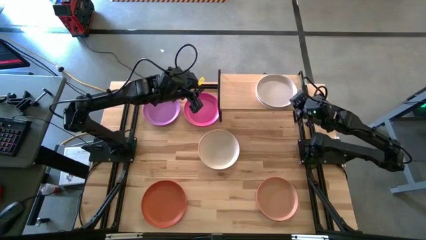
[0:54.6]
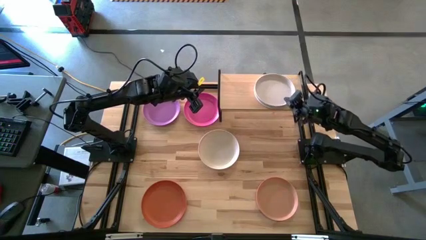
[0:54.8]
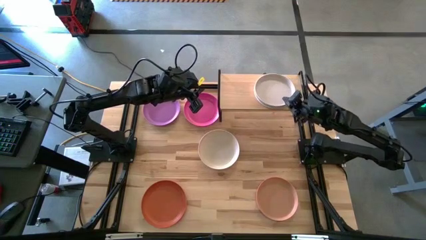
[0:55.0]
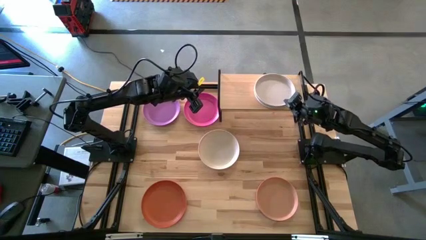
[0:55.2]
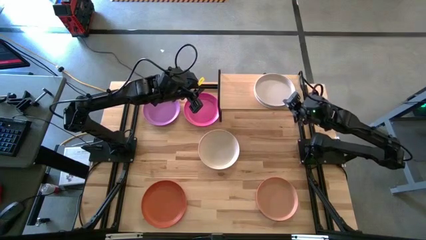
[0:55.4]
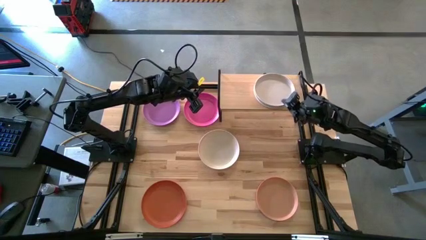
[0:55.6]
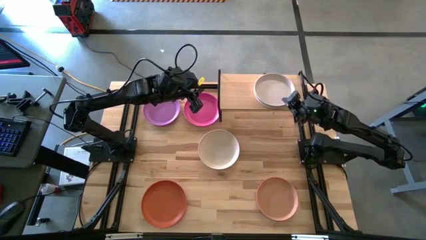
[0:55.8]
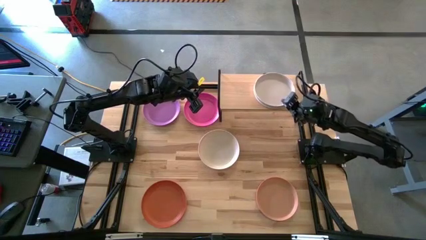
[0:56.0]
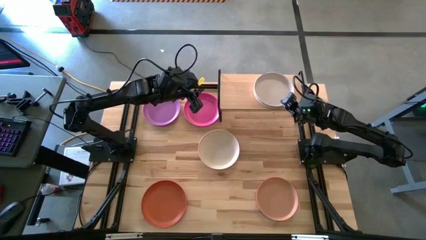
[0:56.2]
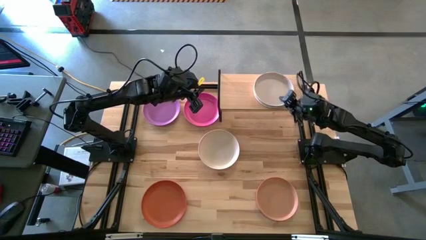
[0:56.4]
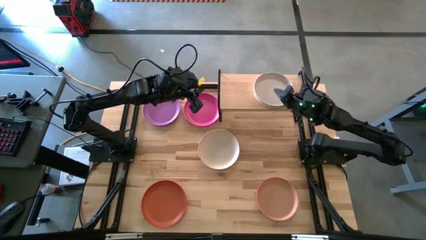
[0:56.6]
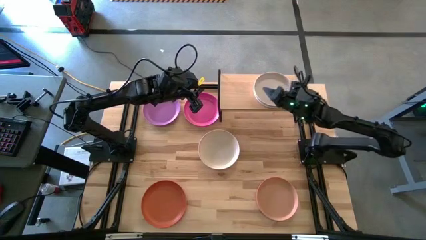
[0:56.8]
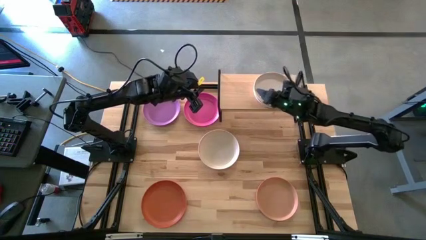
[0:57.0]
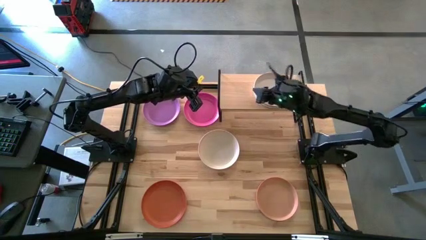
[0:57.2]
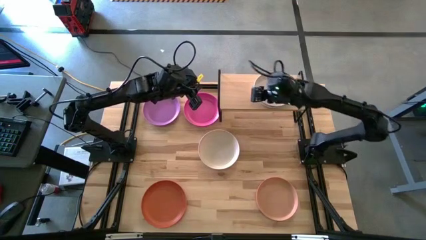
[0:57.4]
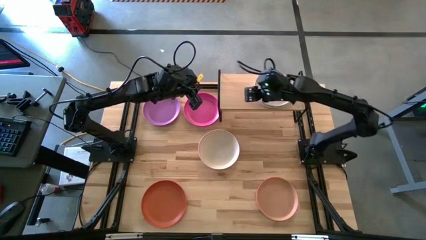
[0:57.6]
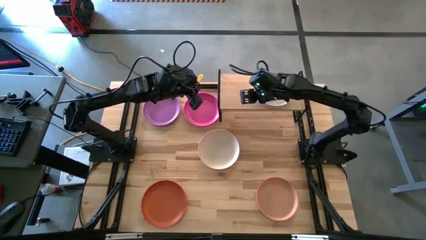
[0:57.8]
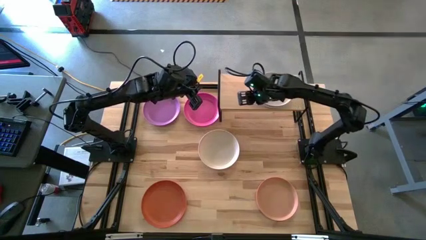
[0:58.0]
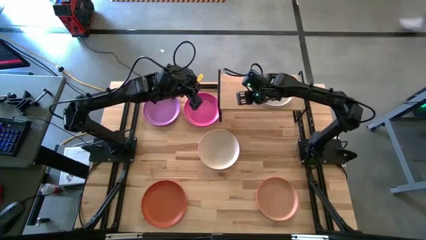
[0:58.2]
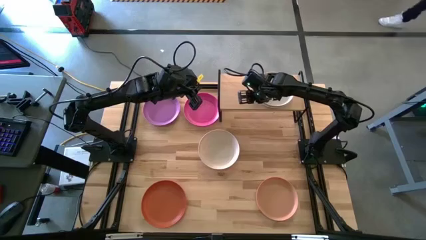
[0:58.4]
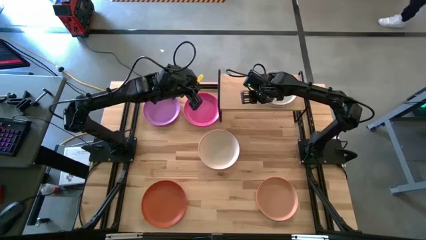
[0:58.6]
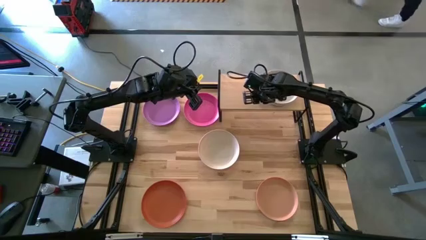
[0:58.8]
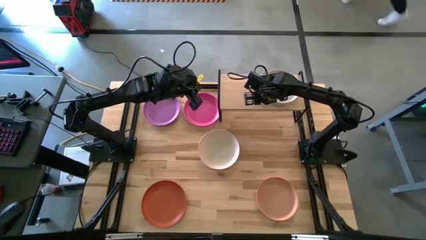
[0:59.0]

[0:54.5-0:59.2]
Task: Place and stack plates onto a shelf
Adjust the plates

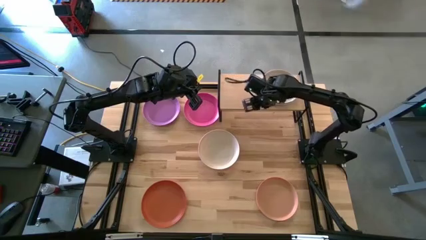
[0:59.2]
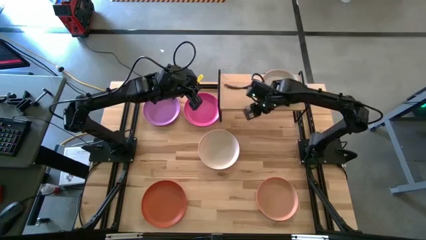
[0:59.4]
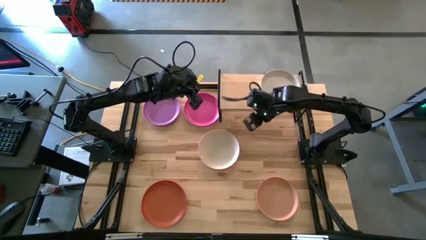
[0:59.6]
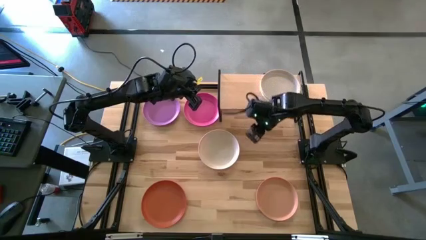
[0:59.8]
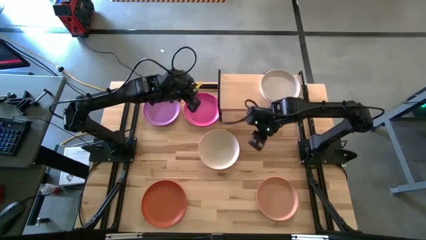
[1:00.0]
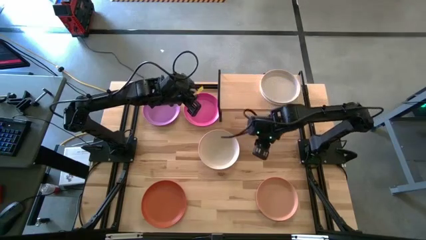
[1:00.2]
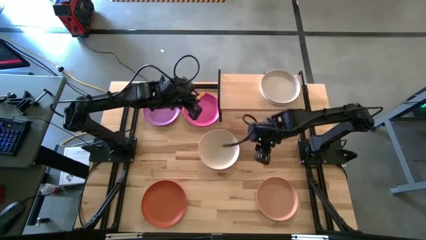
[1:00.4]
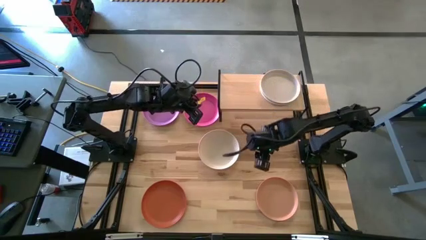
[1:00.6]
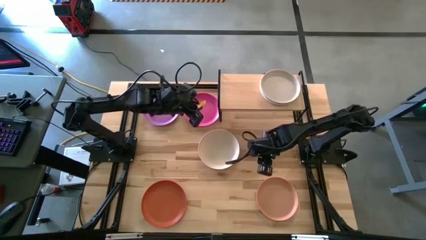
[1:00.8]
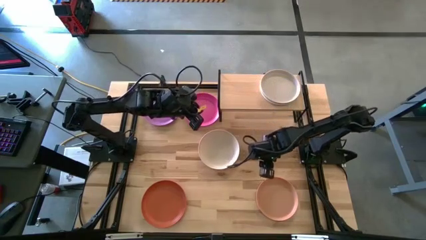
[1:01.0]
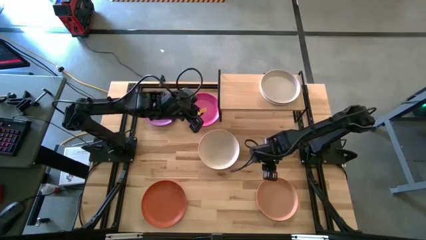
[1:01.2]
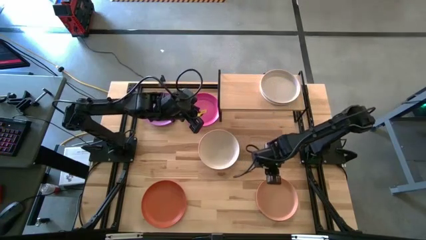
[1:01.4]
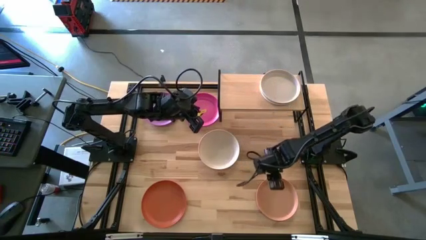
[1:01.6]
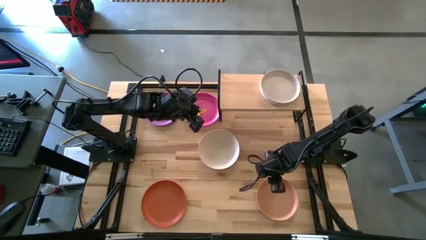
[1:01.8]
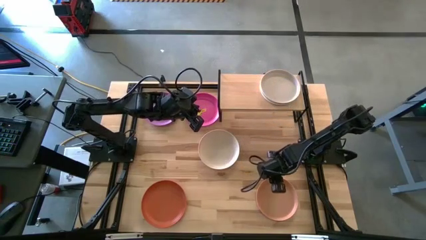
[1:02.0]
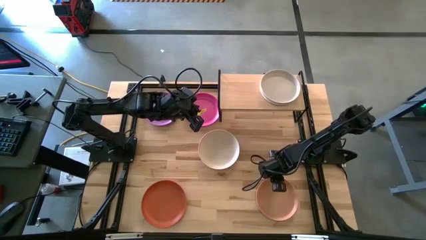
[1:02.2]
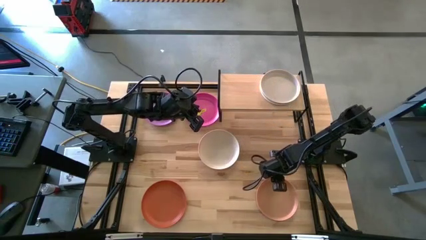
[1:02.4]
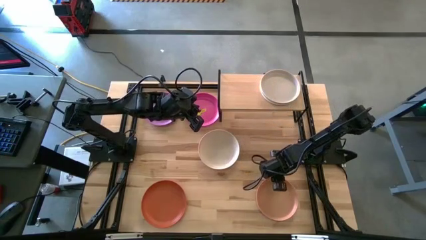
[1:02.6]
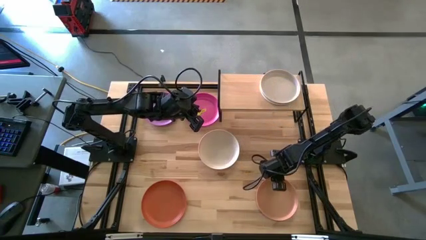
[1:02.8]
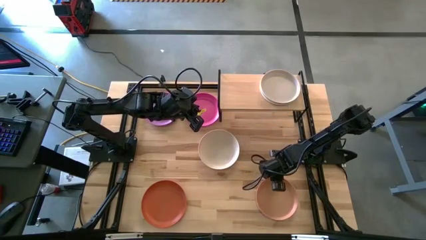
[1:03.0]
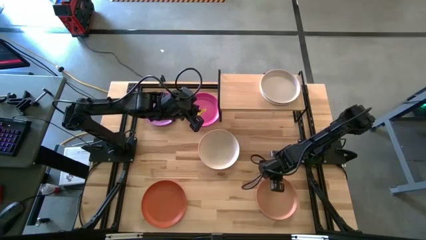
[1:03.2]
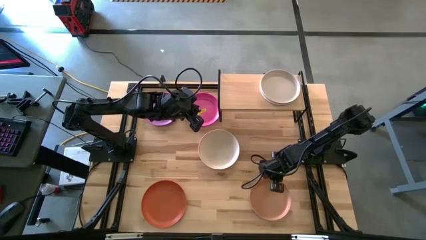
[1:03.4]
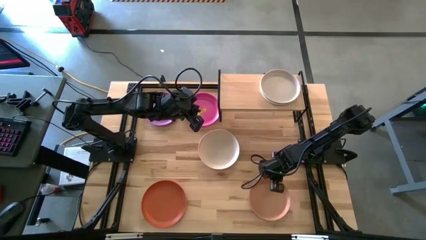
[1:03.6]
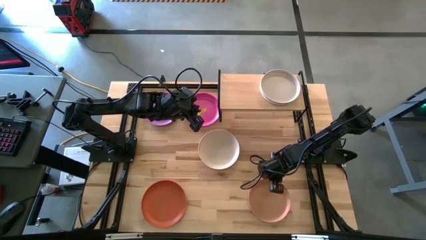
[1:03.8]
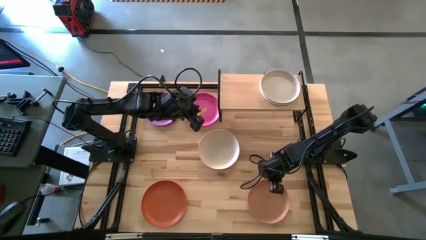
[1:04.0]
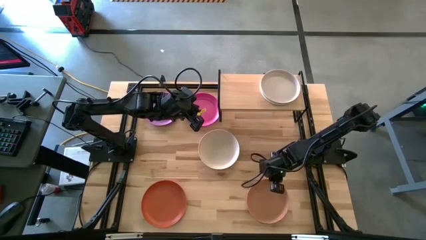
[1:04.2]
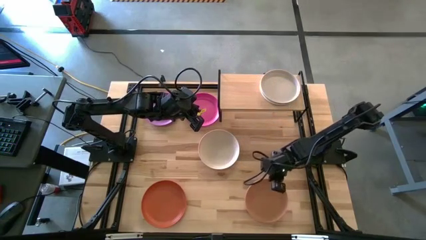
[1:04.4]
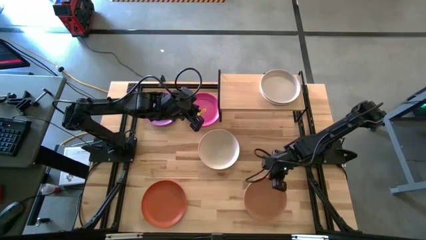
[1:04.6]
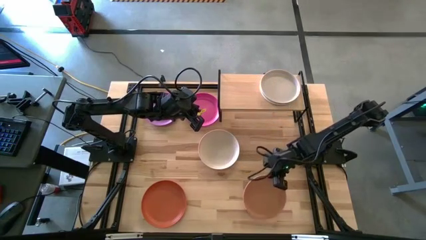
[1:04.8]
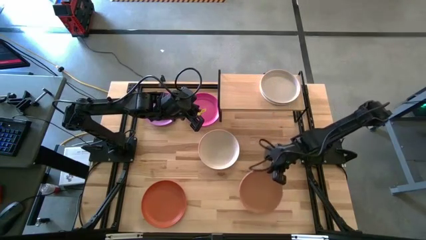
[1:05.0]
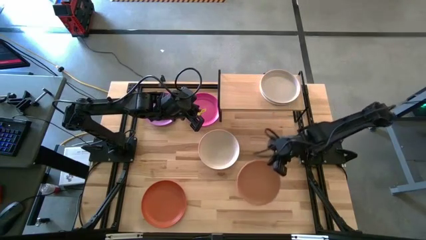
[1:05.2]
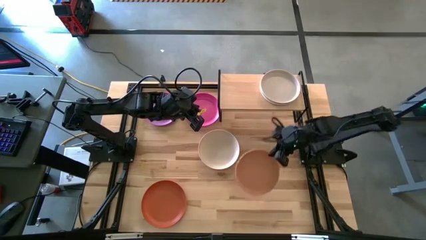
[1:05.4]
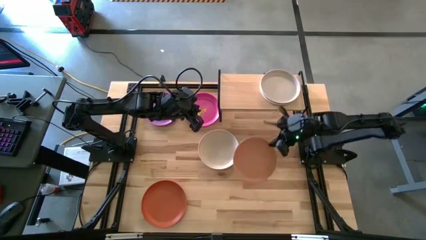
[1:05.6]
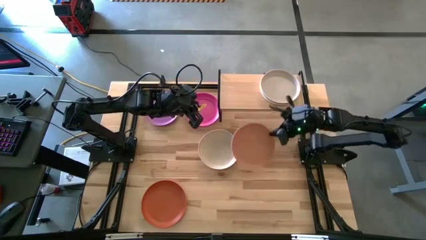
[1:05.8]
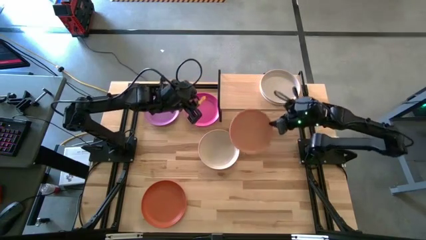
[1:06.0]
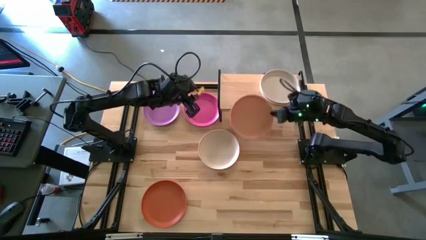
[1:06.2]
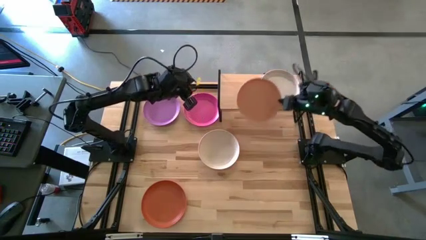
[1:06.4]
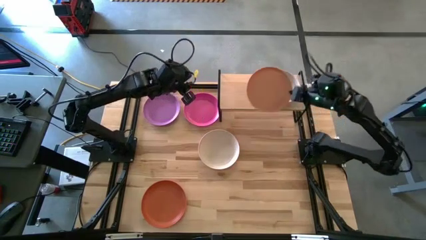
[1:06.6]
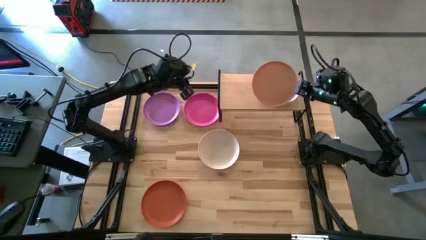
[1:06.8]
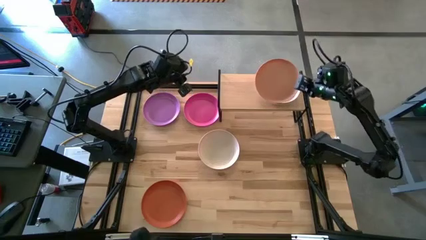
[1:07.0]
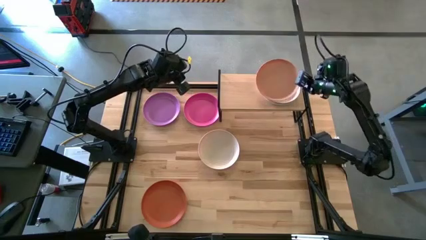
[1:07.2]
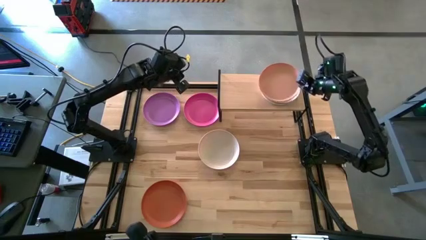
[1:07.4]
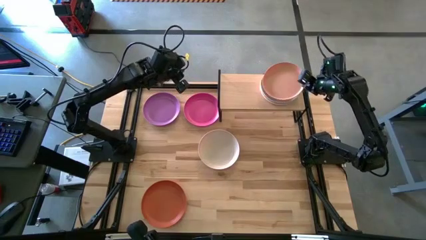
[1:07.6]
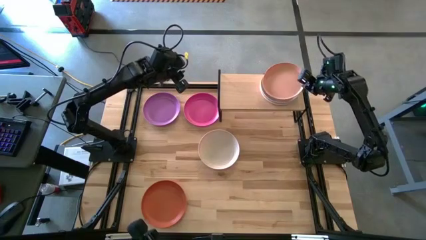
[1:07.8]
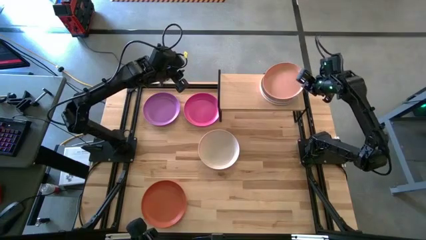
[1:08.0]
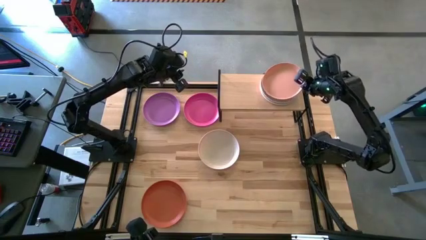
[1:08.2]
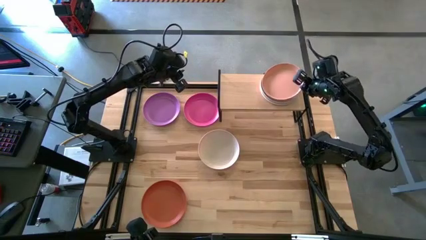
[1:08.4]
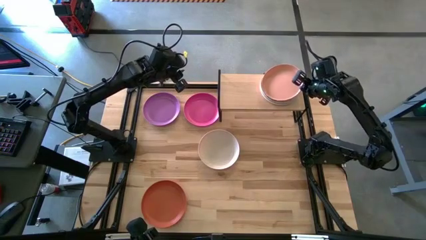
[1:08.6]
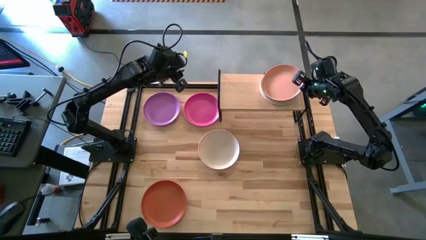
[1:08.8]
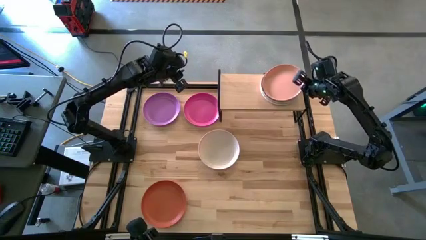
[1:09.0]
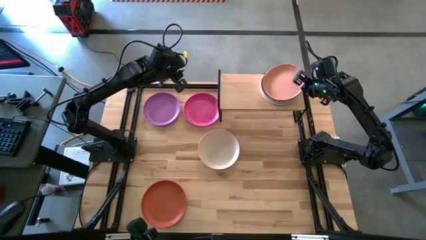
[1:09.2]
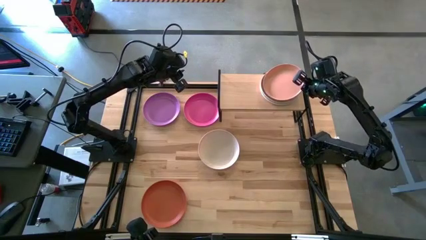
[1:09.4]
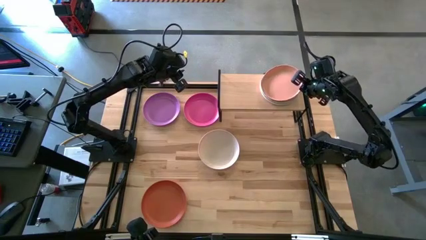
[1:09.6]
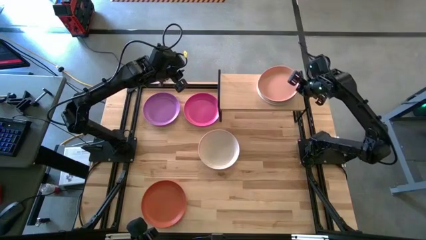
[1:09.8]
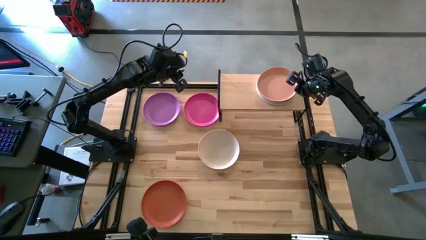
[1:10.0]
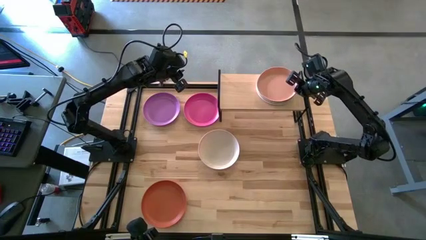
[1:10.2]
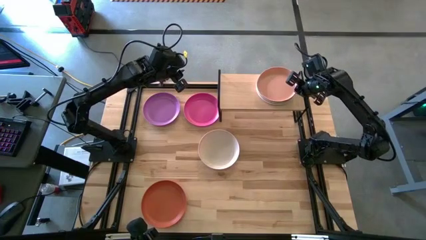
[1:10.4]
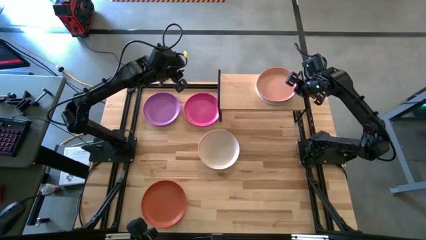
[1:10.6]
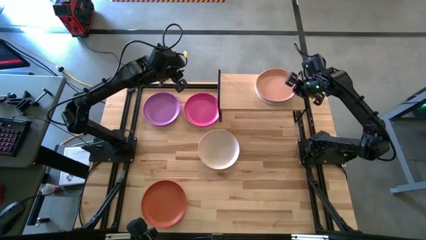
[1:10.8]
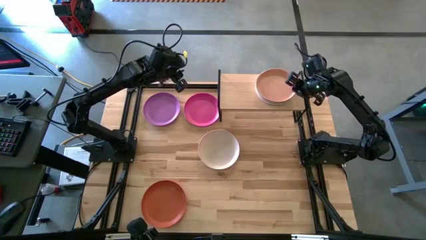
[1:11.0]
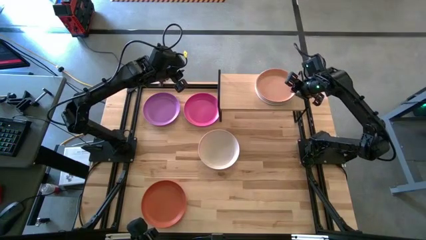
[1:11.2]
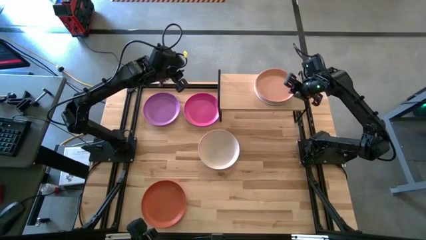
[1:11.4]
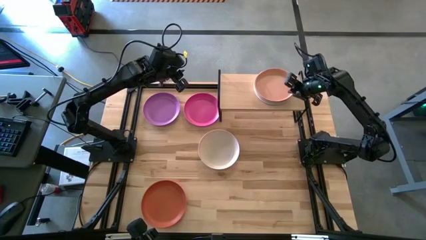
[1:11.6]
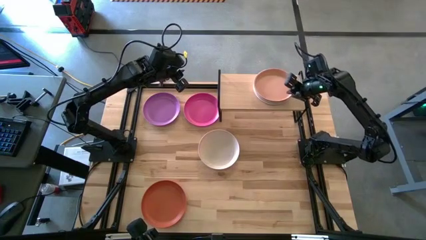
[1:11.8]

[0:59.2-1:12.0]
Stack the brown plate on top of the white plate
